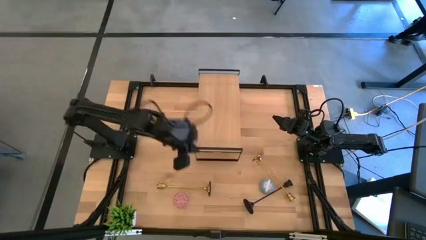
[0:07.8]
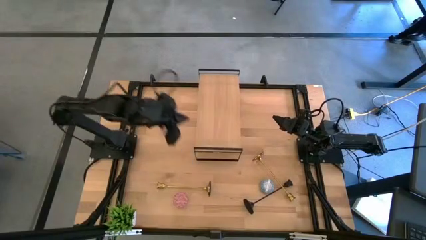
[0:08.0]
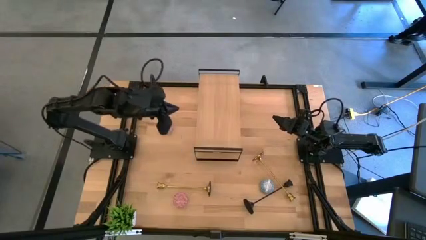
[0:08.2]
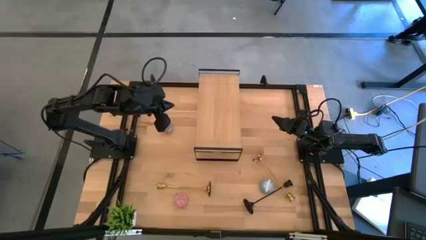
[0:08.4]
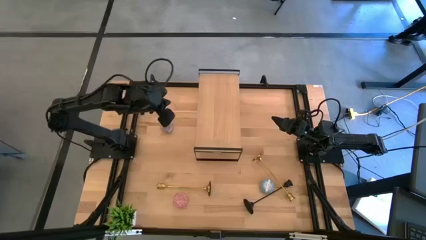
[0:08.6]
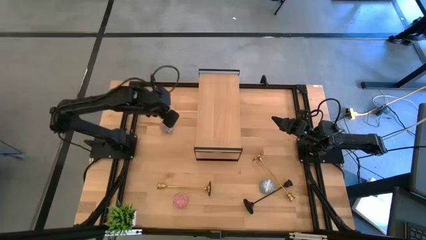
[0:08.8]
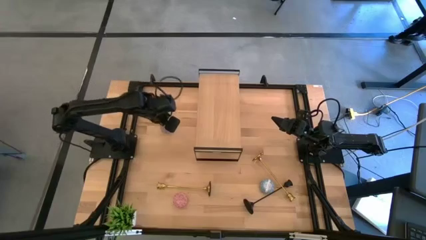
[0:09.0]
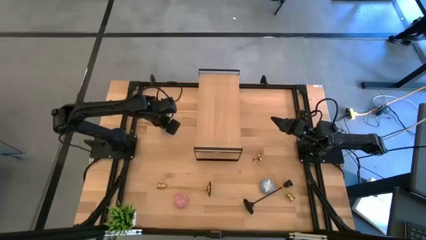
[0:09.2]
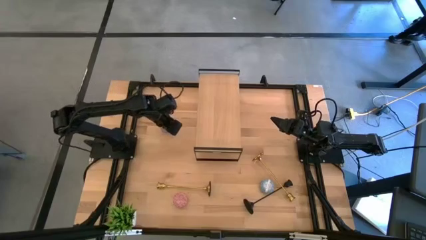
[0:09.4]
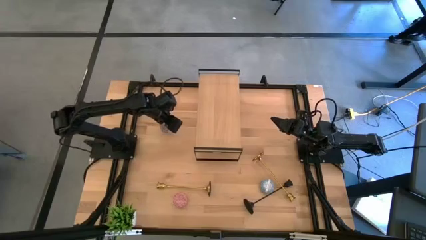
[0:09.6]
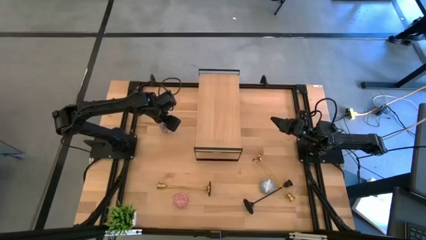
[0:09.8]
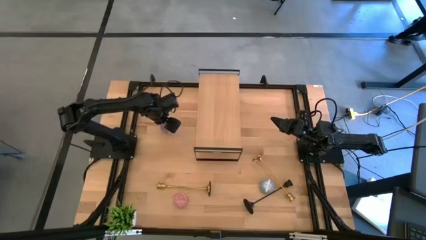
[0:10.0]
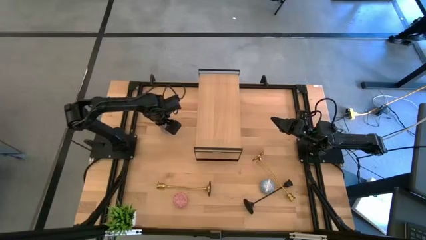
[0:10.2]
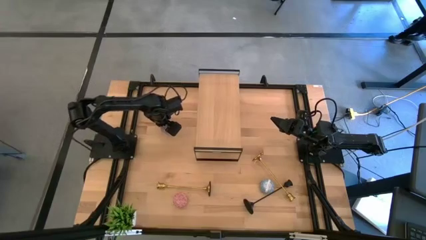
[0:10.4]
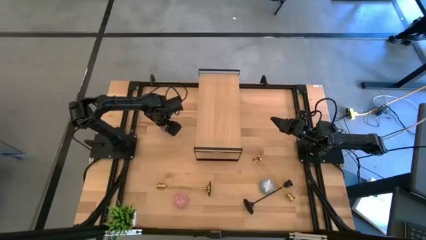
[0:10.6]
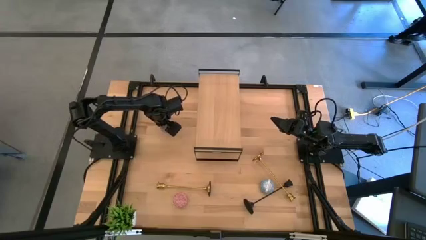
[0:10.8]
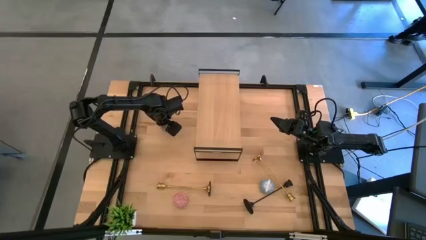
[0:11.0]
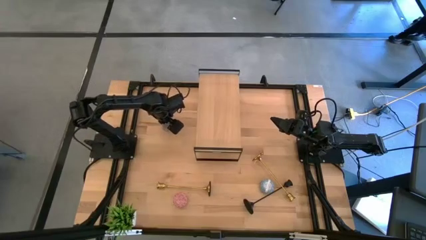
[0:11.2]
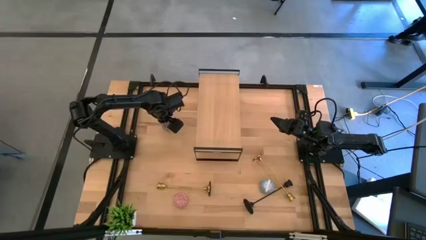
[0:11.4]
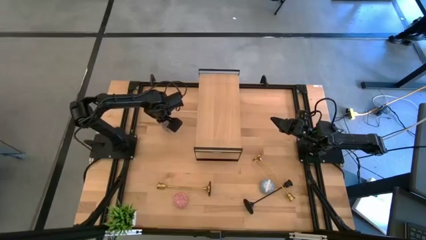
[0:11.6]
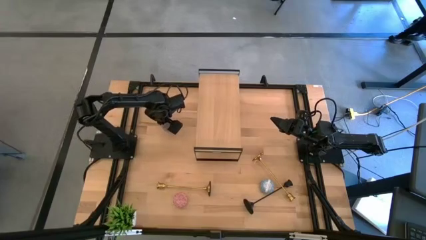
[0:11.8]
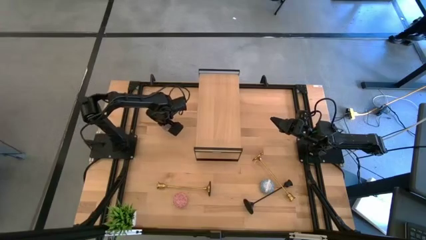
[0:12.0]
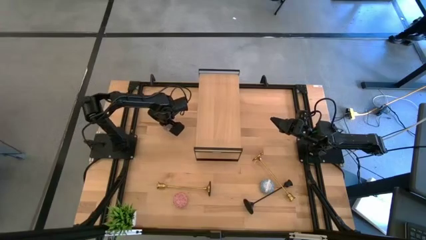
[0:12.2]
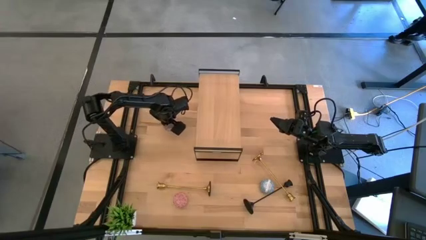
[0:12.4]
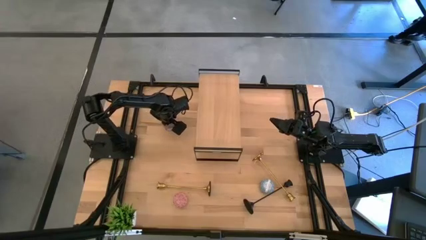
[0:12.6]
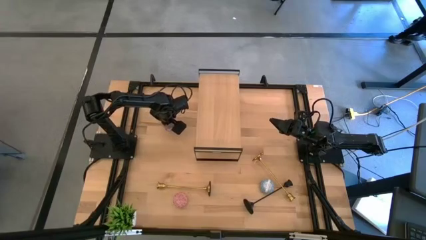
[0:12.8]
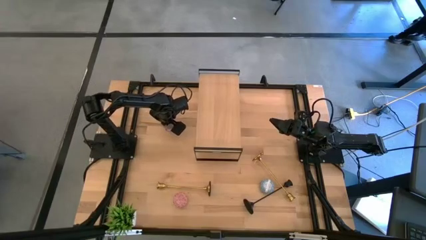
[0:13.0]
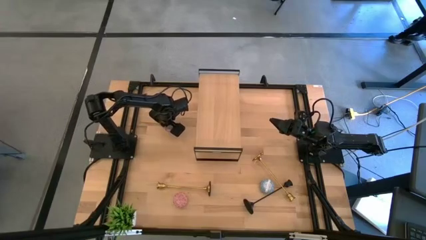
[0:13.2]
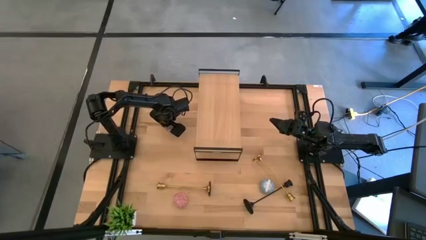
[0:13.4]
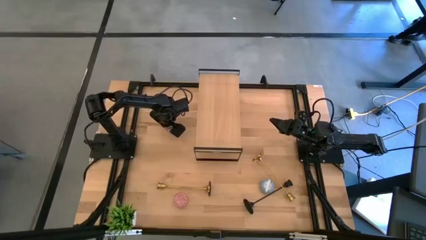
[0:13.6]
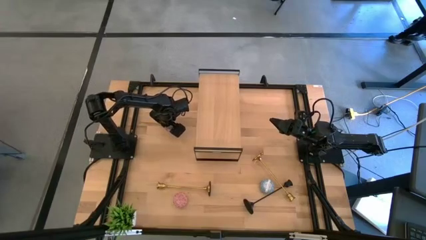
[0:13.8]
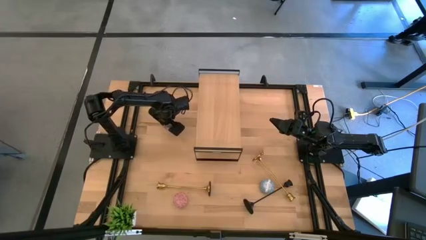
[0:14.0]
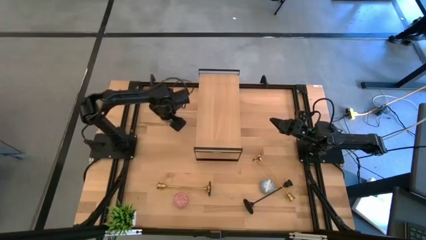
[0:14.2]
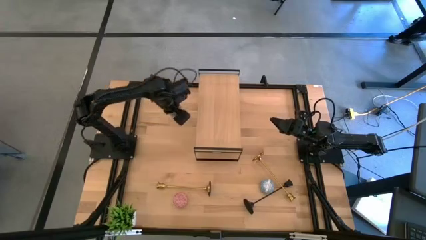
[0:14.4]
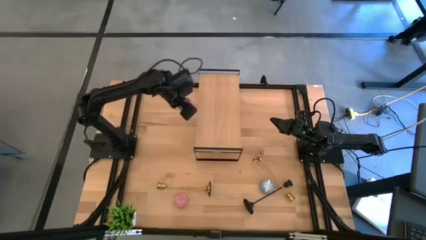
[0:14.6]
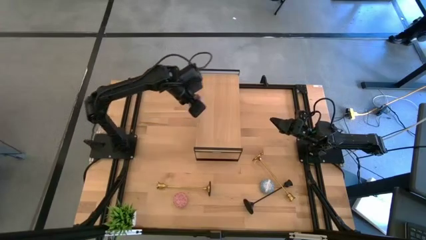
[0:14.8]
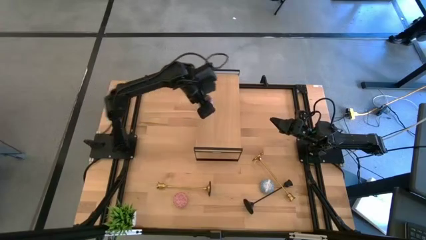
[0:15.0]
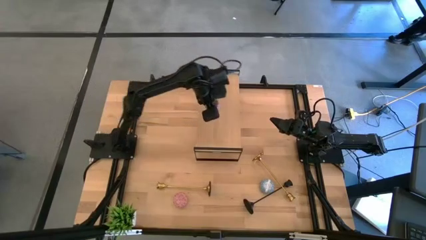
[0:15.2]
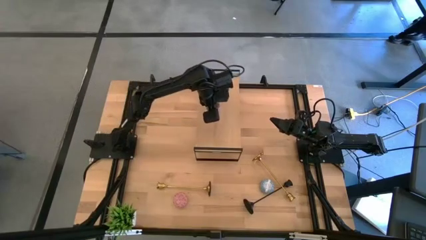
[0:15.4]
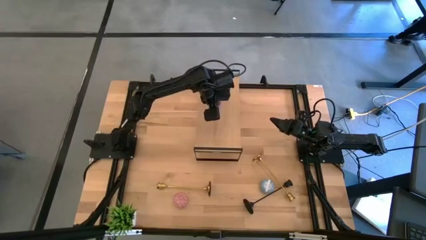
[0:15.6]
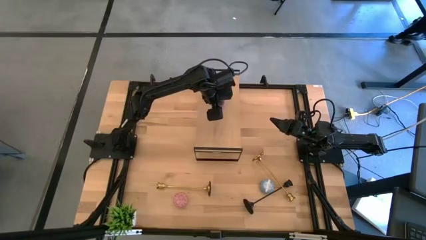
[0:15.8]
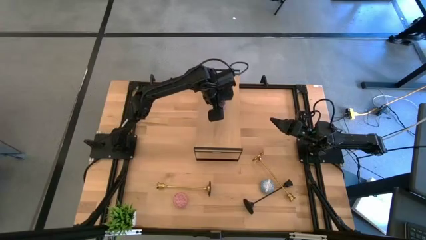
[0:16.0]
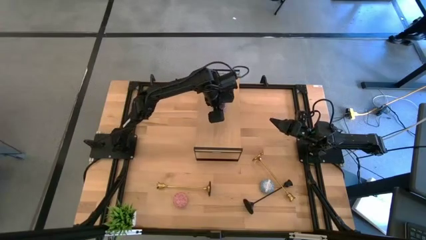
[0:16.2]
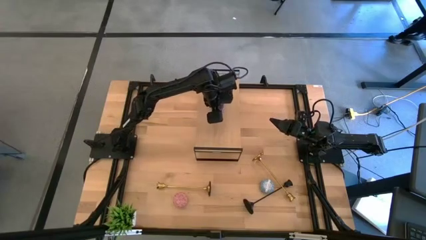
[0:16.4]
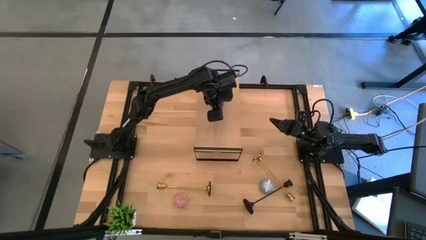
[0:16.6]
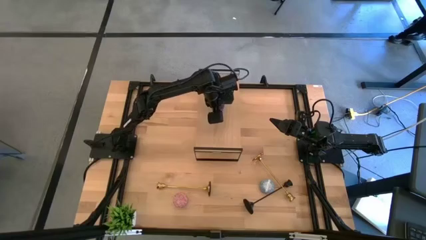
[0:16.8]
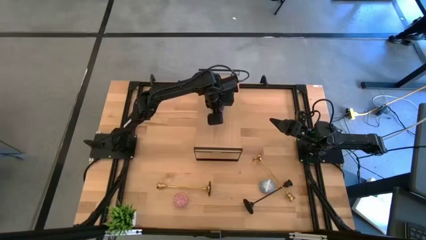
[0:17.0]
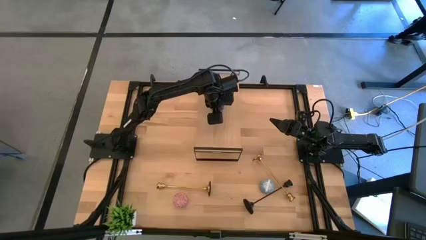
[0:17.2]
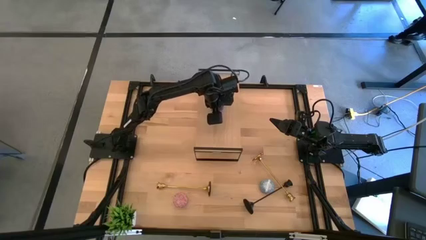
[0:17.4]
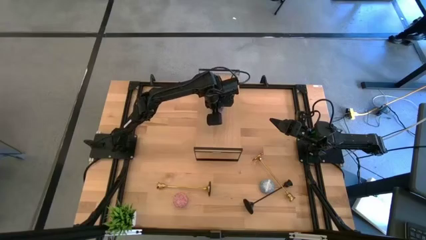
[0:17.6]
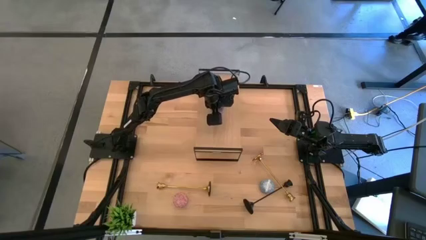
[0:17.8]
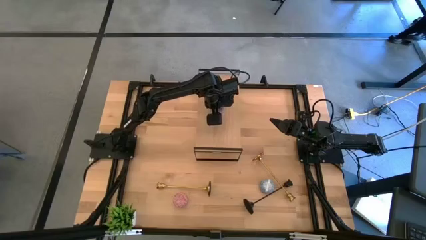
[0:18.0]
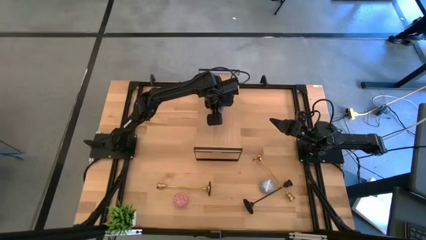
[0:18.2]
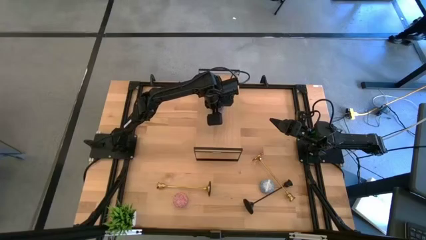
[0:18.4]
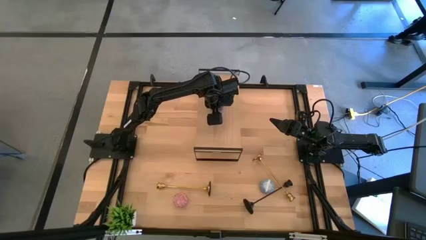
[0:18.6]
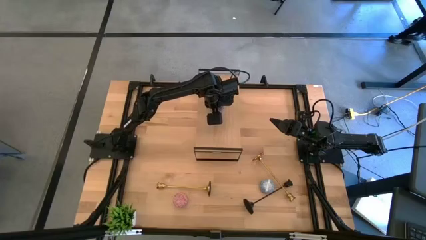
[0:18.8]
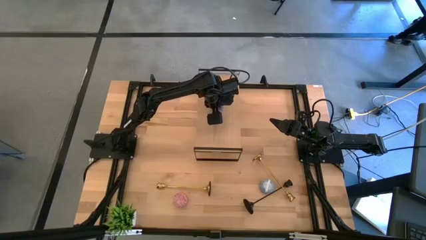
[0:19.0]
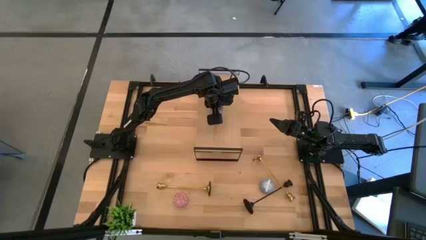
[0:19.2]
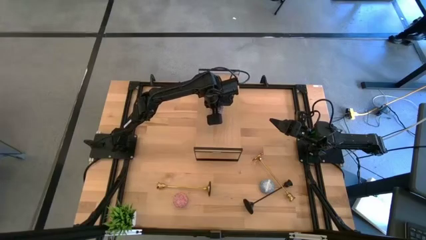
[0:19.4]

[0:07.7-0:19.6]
Task: Pick & Place candle stick holders
Put the violet scented candle on the shelf
